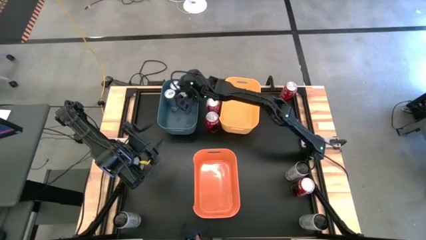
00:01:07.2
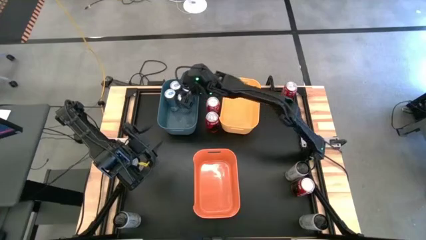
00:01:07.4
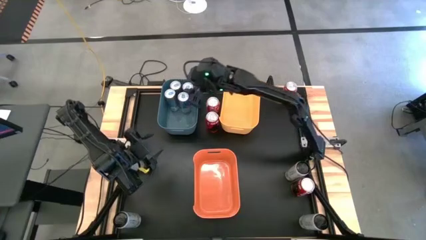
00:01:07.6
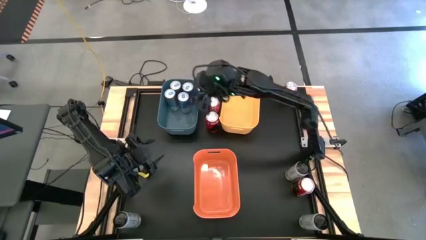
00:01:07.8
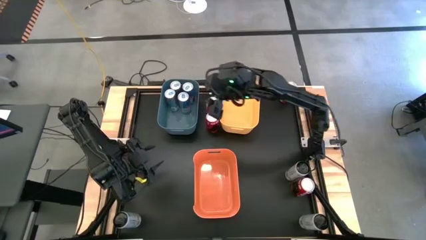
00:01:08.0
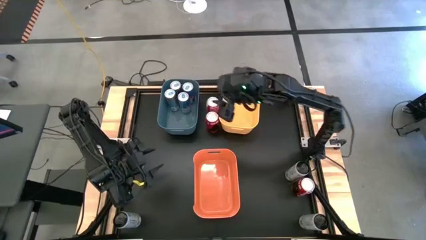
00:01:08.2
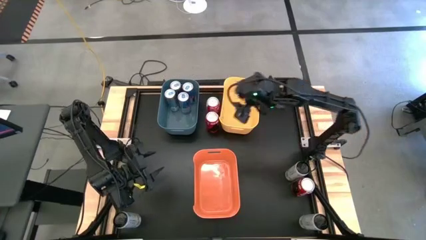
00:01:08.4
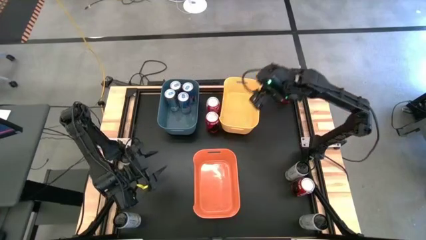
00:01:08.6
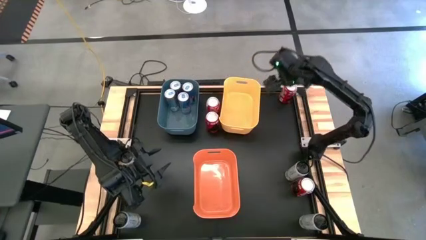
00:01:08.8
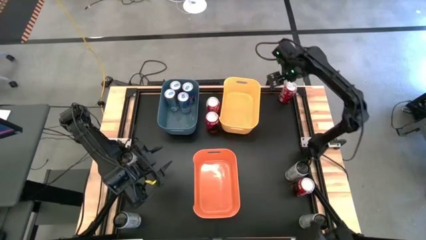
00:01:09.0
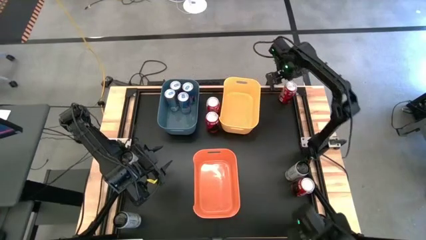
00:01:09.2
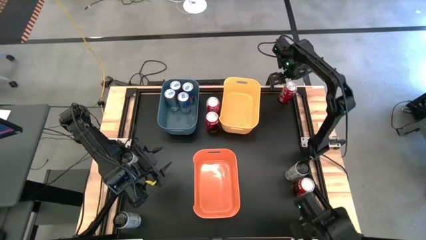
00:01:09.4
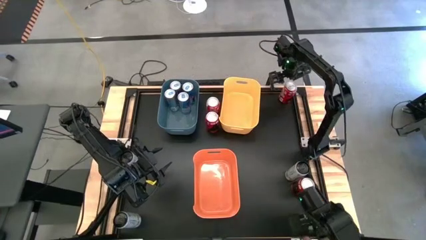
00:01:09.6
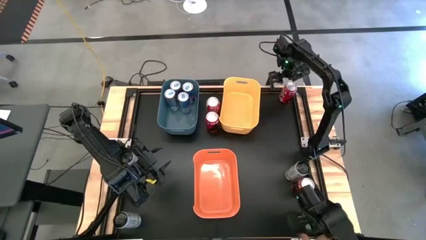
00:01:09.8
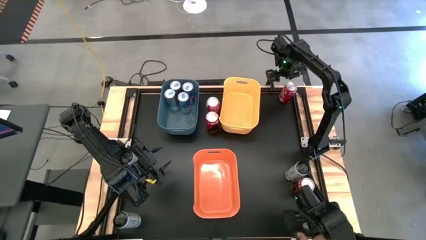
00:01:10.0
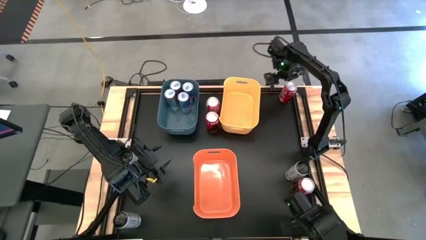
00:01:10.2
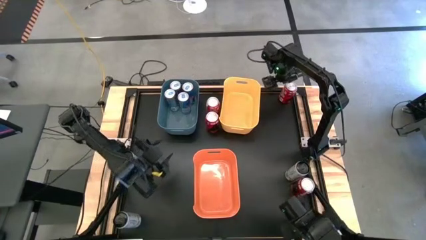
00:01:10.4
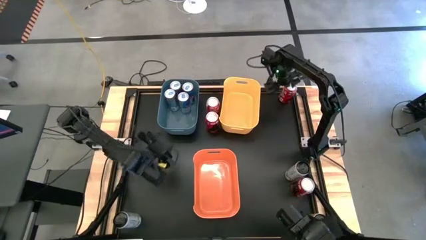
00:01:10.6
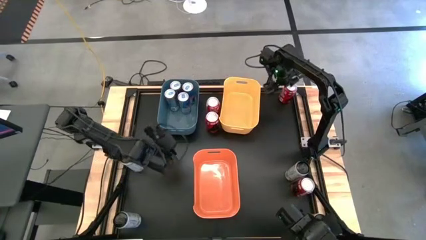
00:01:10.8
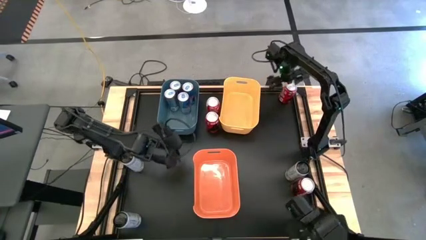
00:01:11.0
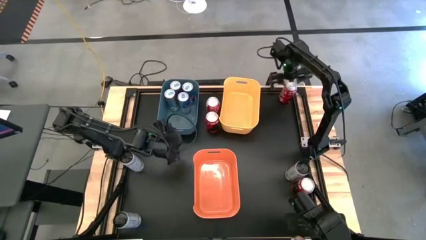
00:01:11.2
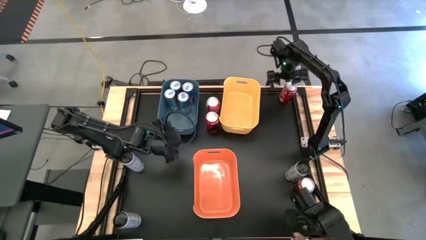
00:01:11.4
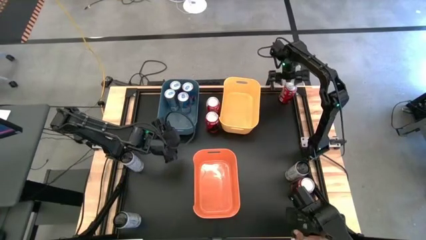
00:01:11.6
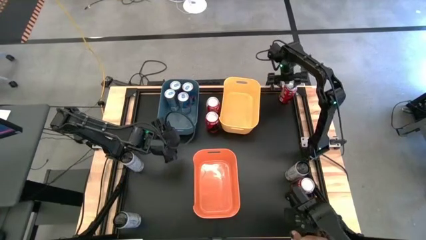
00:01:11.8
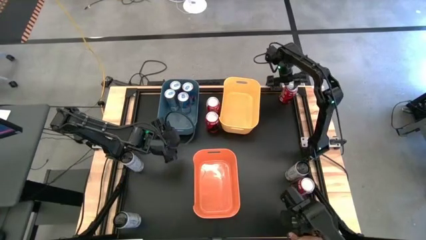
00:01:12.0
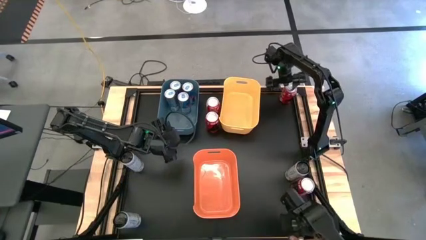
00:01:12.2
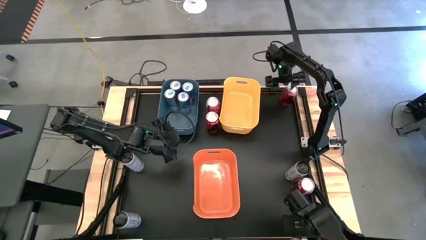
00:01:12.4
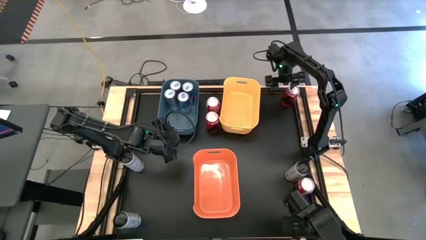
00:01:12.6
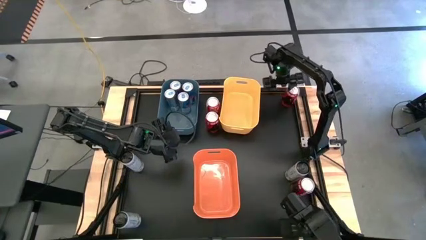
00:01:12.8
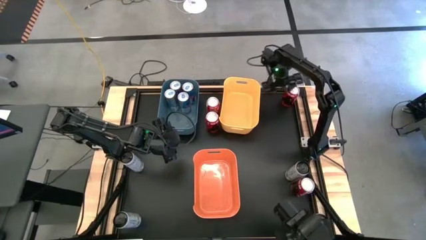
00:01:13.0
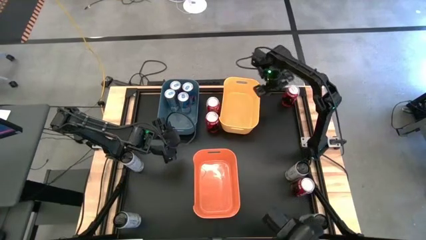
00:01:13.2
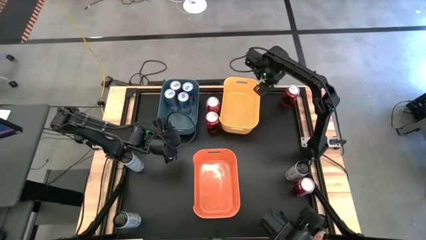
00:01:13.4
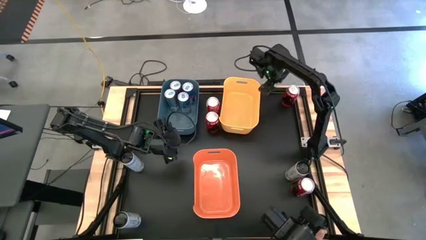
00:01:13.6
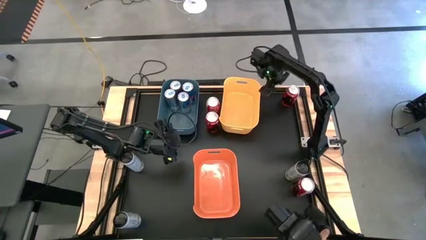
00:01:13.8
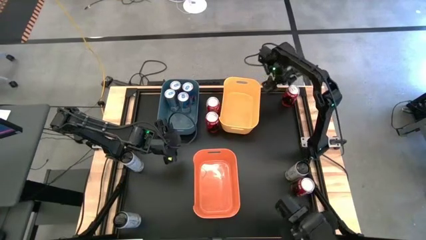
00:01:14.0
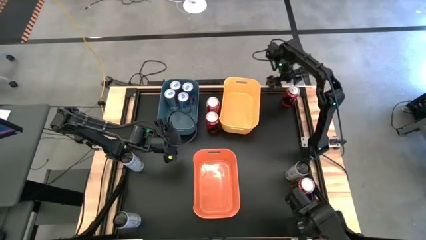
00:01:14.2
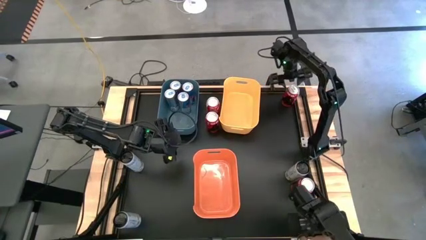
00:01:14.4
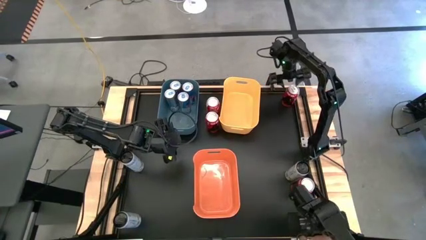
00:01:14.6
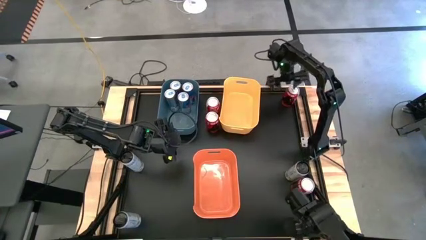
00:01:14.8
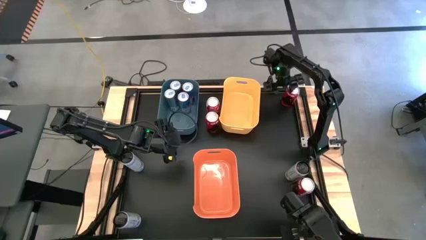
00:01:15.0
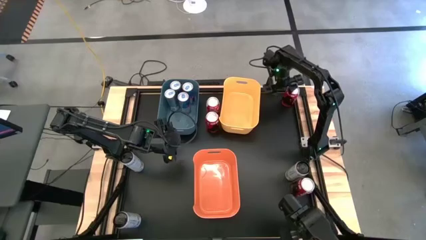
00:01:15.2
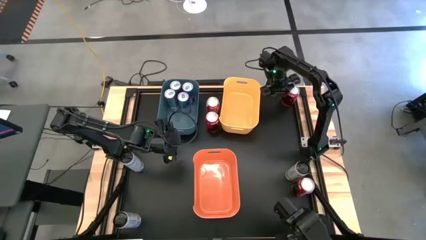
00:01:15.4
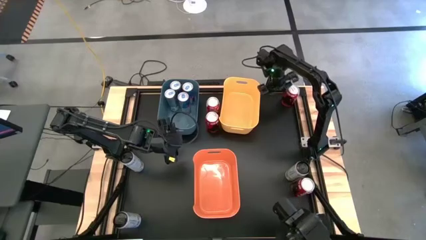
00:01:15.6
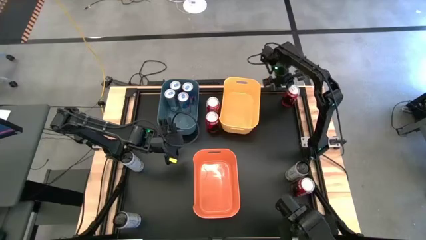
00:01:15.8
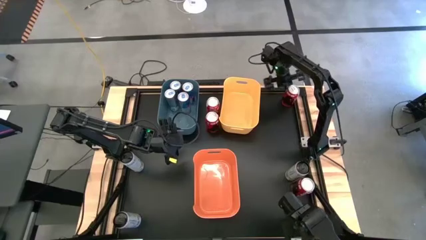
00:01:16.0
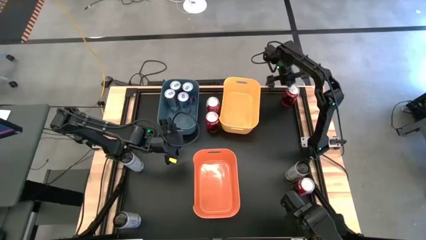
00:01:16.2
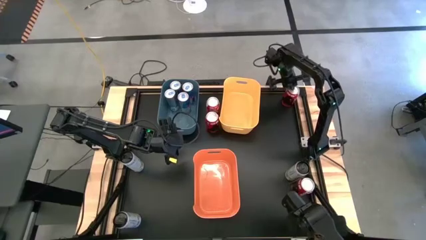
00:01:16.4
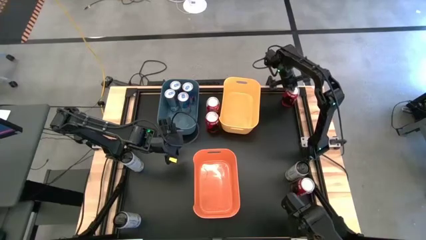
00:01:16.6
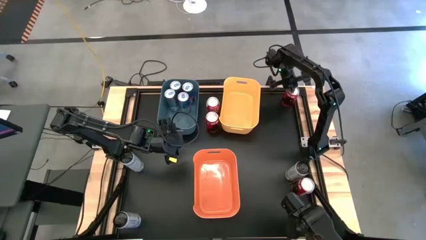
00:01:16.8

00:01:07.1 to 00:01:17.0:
Task: Sort soda cans
Put the bottom left red soda can into the yellow bin

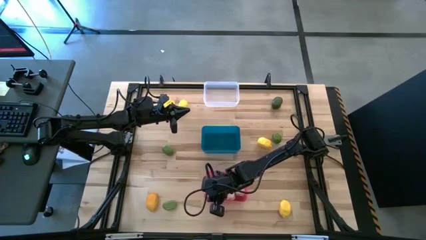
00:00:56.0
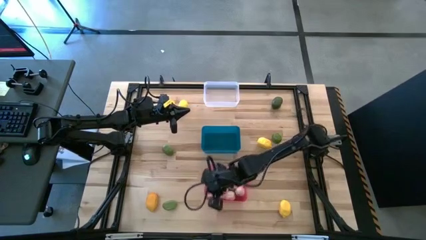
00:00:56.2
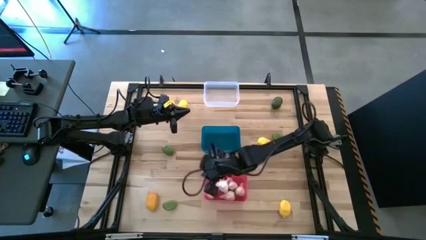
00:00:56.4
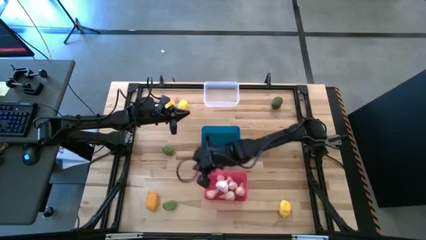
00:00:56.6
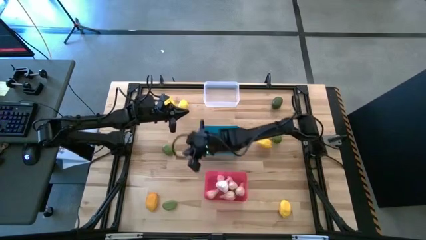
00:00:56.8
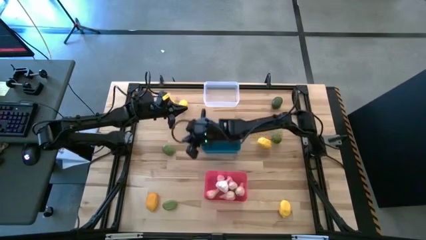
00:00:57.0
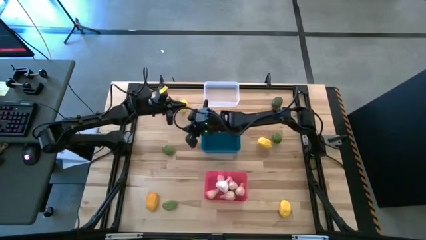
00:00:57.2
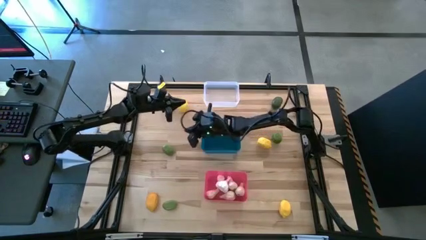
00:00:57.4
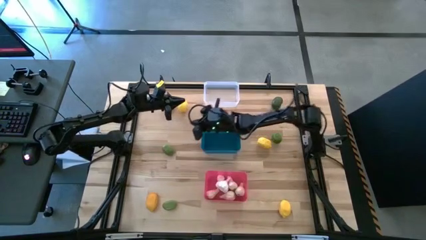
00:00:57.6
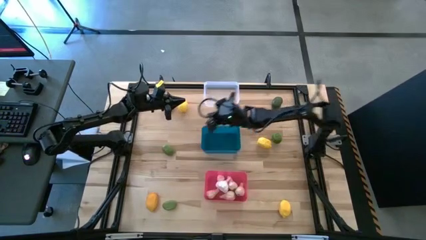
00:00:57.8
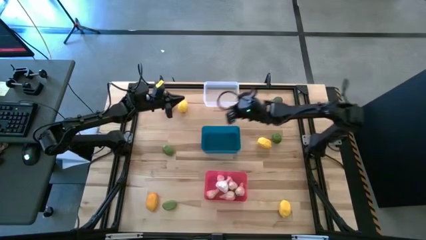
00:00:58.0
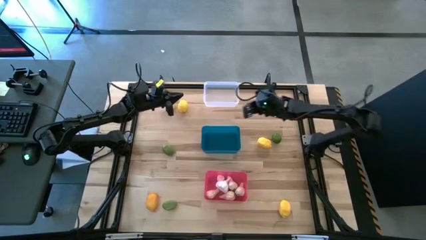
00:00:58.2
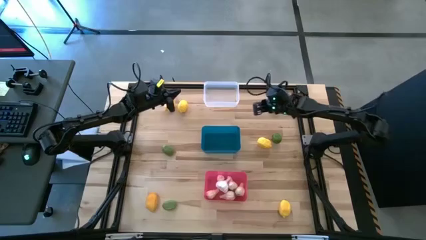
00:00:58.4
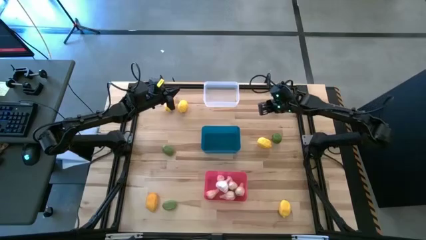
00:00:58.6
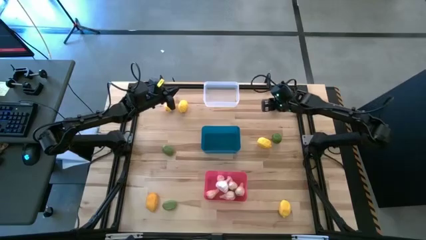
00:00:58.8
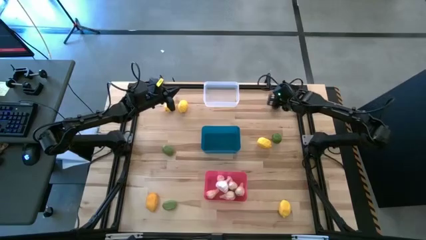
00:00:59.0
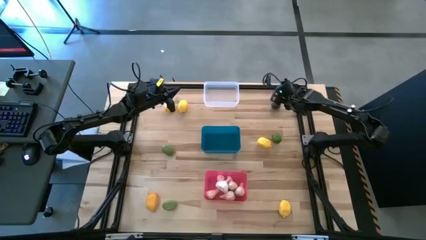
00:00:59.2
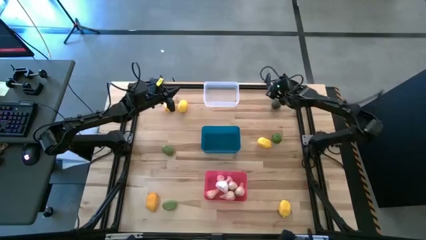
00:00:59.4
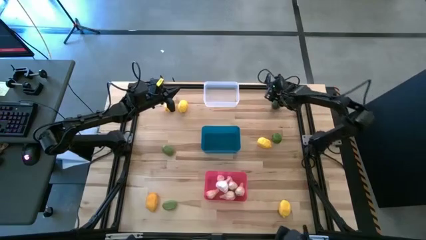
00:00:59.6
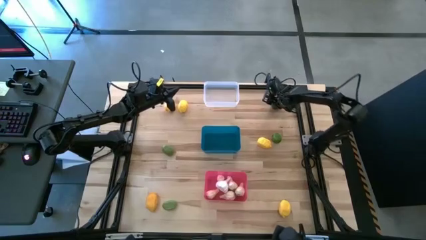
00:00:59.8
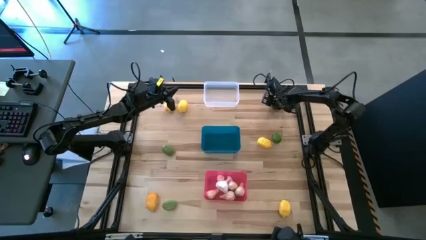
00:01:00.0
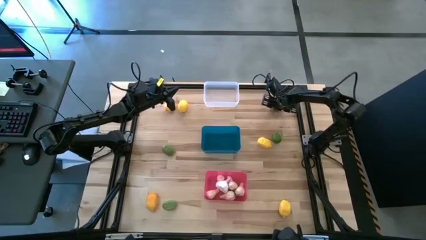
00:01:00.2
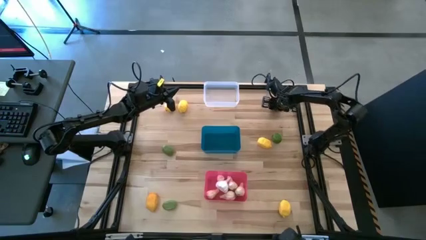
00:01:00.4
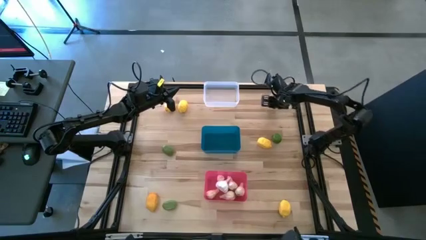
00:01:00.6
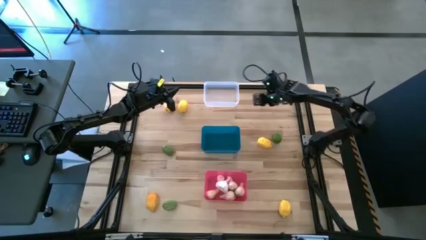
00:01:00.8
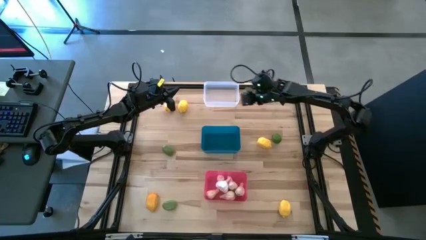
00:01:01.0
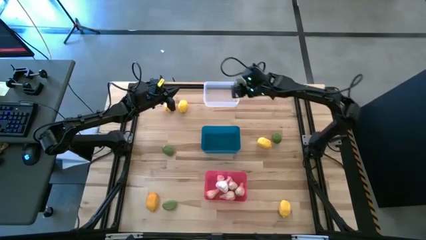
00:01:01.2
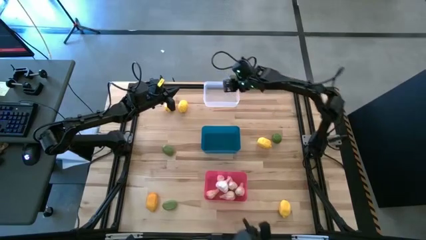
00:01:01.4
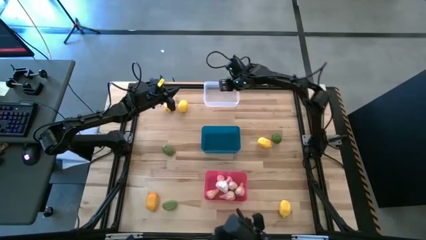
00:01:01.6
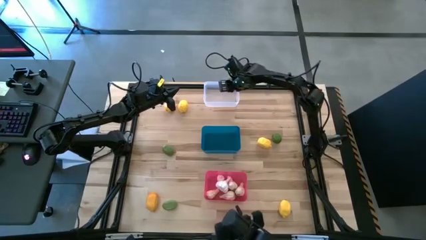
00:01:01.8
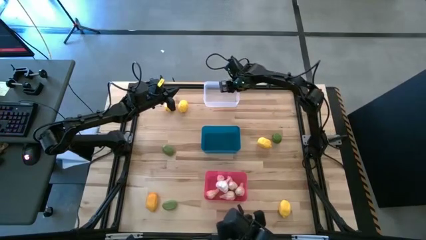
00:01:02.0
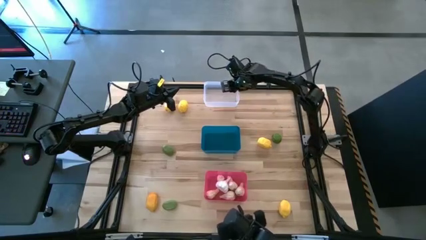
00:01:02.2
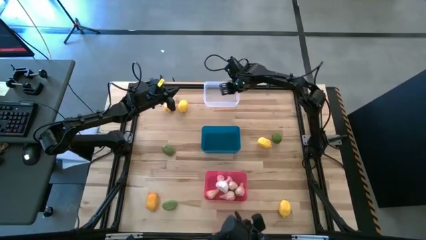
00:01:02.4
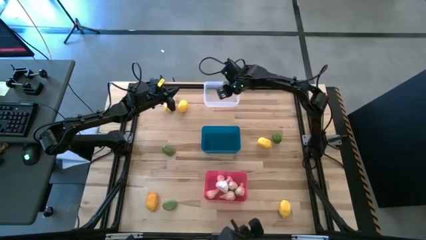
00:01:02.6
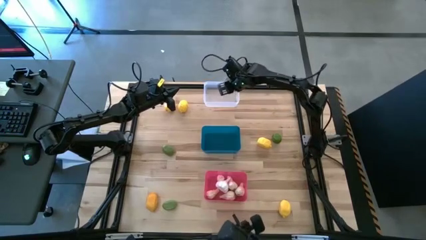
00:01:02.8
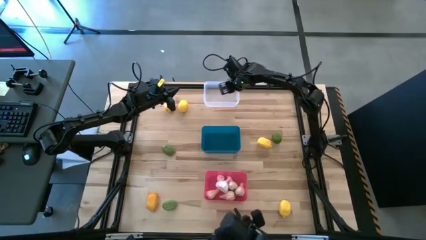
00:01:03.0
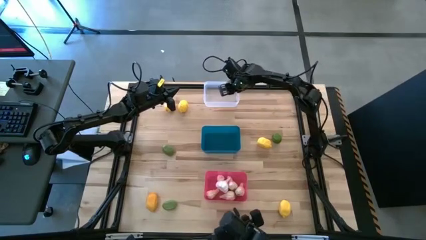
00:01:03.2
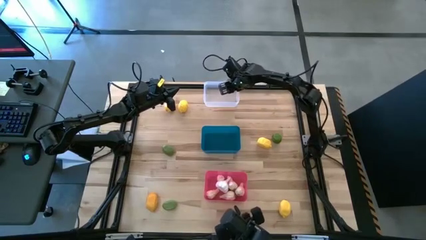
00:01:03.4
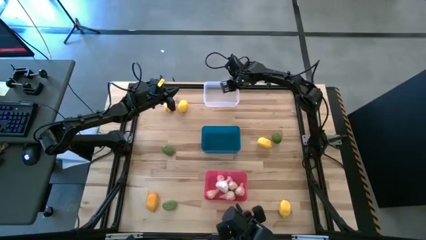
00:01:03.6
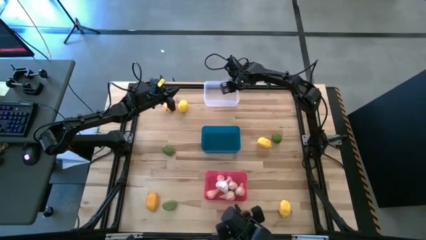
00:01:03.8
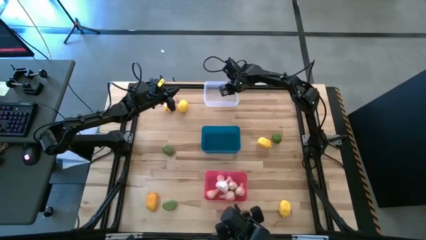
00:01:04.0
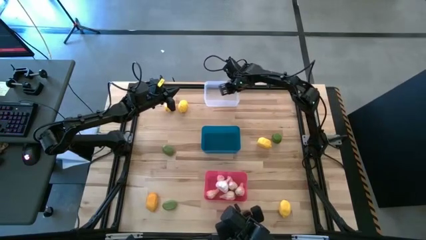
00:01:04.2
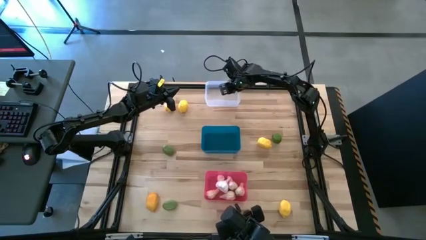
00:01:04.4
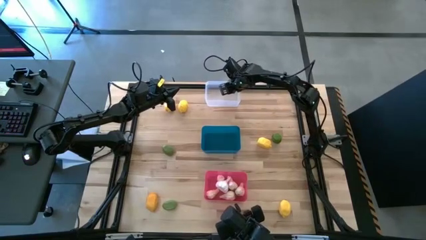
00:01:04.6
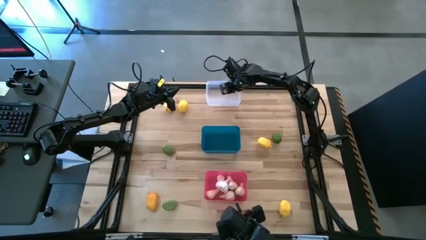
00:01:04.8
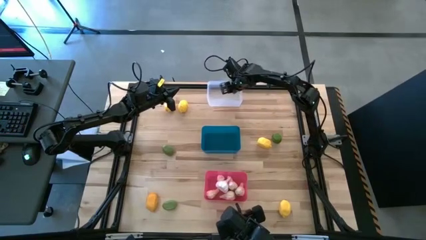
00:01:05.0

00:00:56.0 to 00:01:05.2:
Task: Sort produce into baskets
Put the top right green lime into the transparent bin
